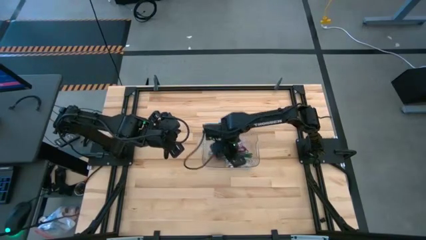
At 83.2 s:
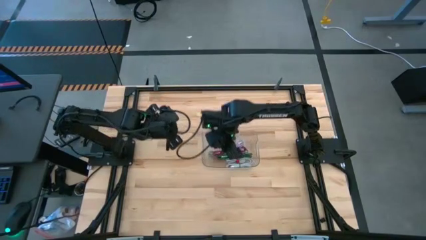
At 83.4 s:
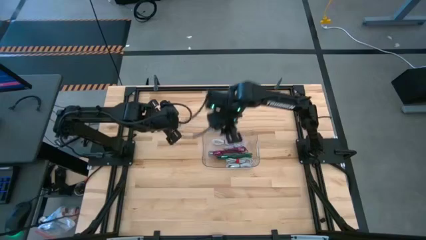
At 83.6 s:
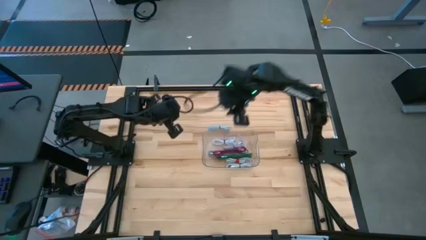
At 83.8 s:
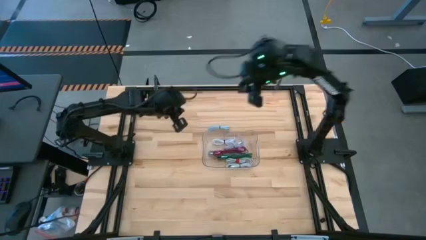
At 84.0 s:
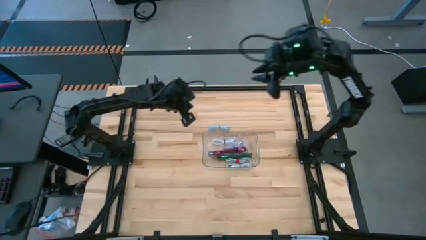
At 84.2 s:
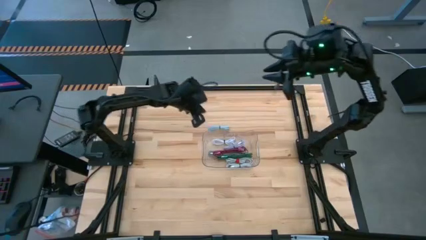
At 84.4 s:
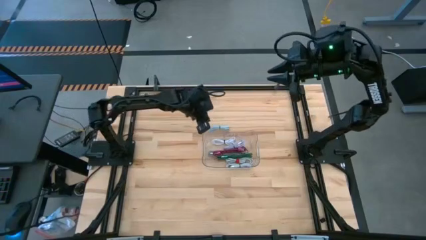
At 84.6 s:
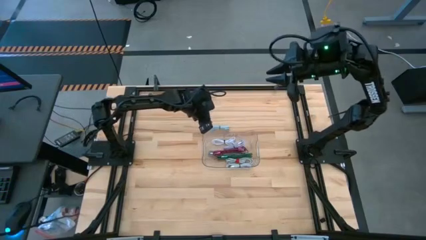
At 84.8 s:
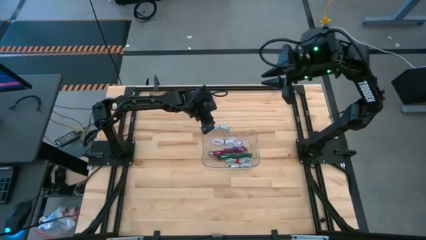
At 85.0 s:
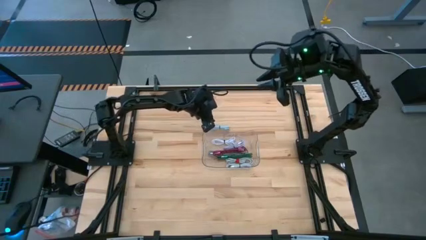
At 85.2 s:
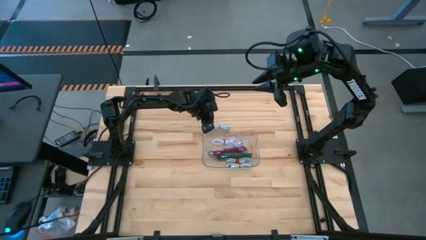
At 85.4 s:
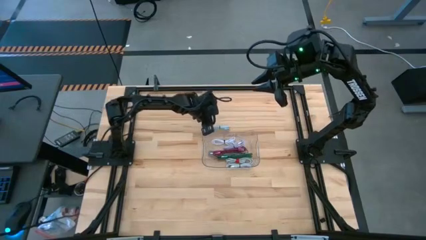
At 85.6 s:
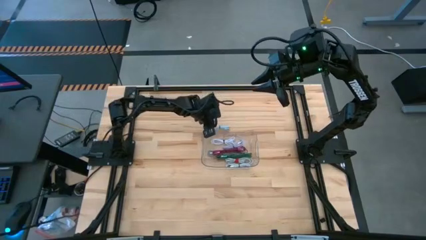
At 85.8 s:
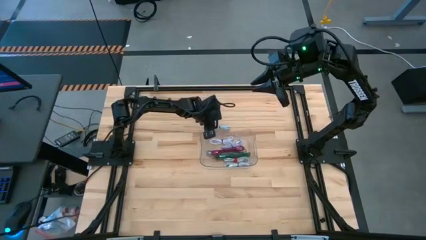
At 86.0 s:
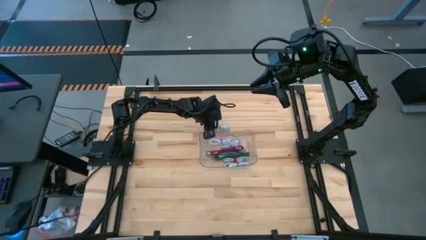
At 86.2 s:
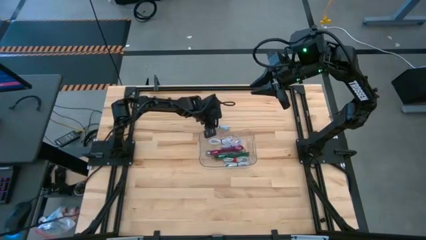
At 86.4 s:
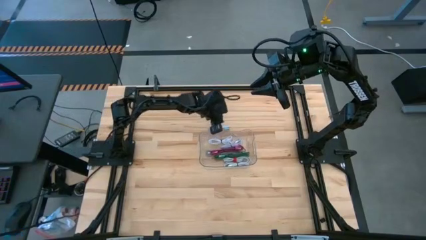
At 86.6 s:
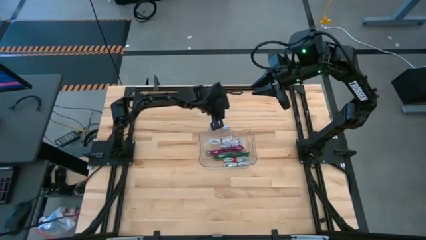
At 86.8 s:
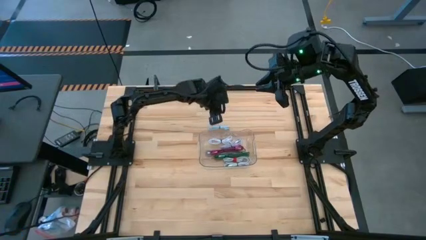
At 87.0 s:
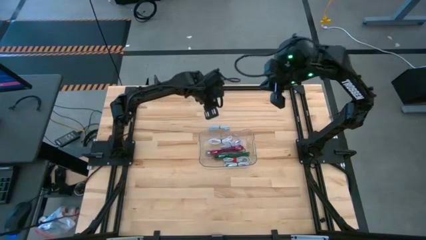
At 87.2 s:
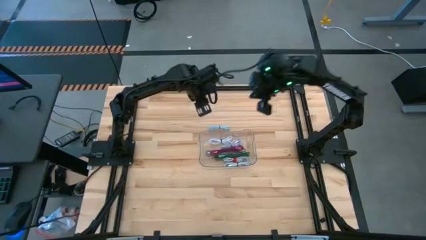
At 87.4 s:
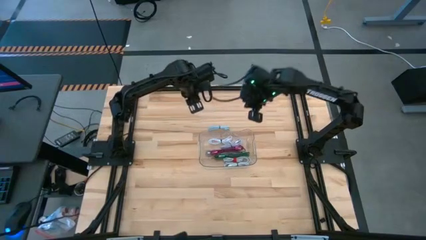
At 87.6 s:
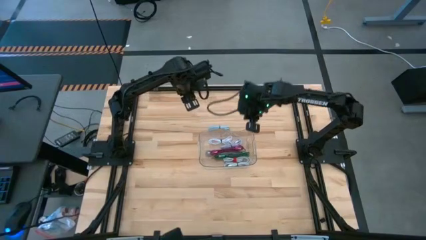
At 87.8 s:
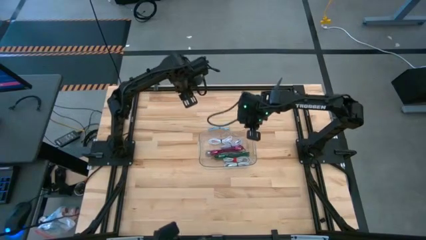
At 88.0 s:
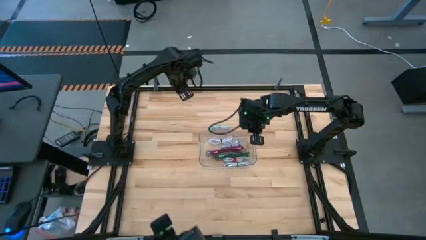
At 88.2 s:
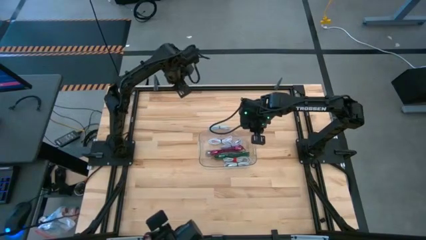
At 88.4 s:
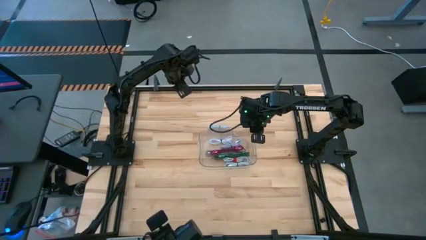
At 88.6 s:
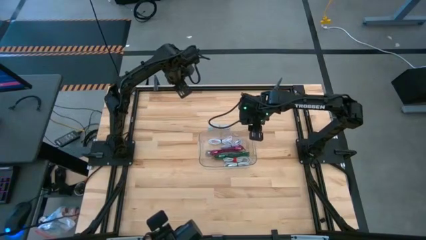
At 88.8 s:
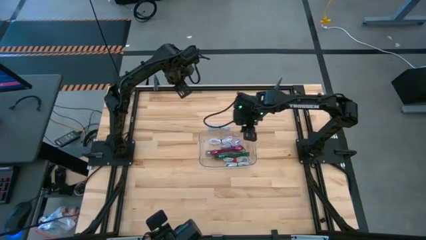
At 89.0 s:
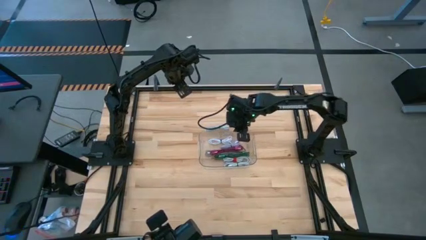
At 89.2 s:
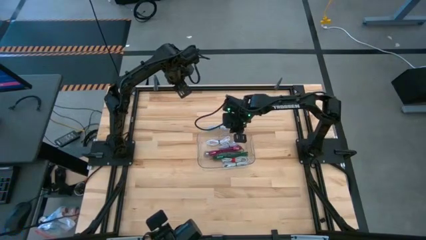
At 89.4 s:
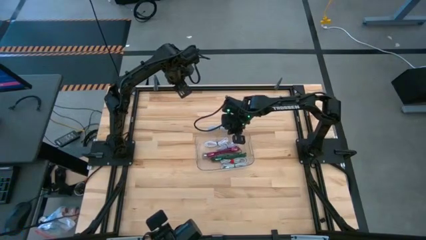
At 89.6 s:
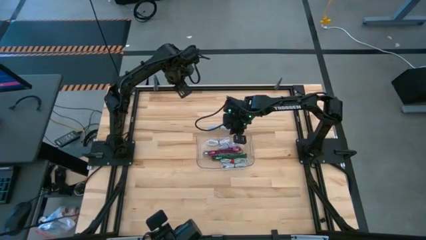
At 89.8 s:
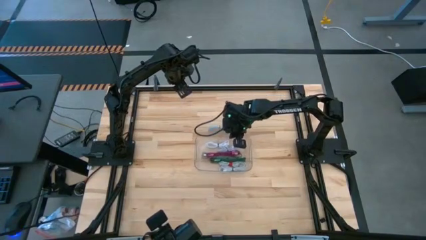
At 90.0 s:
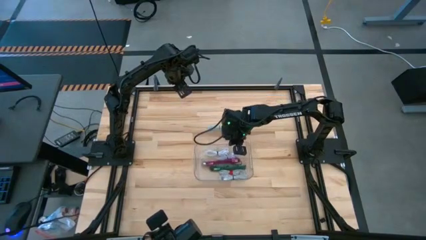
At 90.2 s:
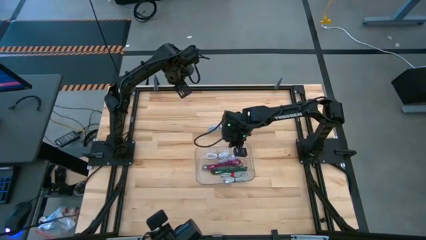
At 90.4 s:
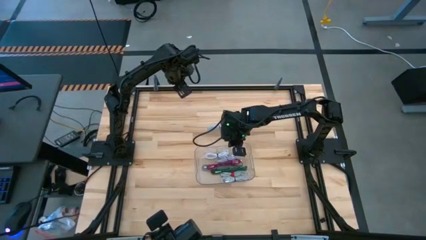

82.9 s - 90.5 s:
Task: Pick and place USB-C Cables
Adjust the transparent bin

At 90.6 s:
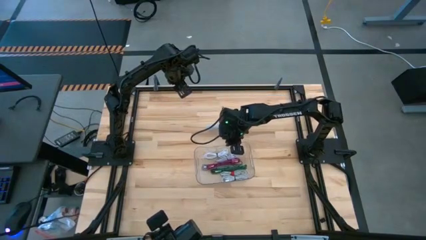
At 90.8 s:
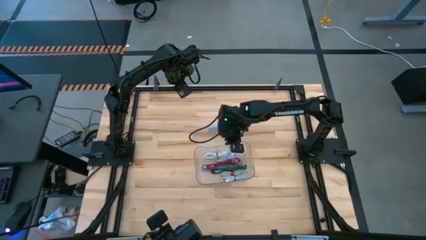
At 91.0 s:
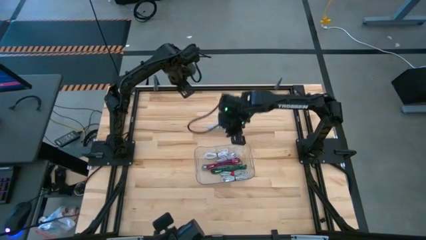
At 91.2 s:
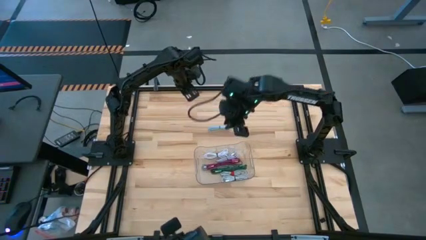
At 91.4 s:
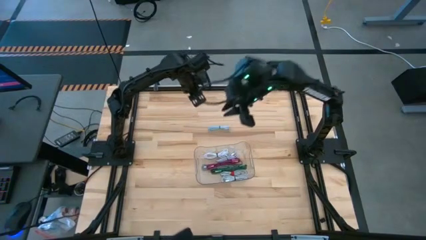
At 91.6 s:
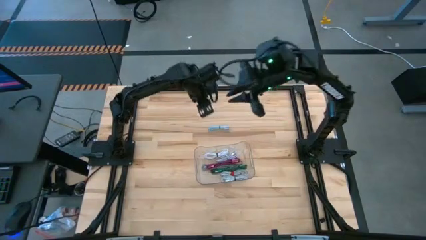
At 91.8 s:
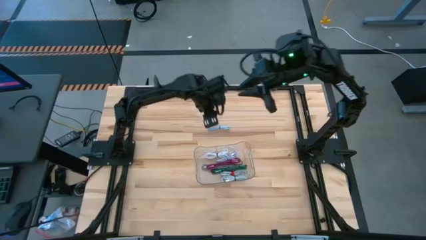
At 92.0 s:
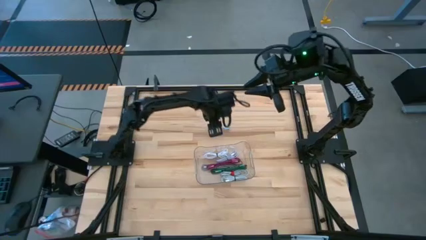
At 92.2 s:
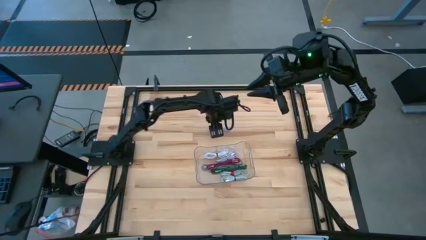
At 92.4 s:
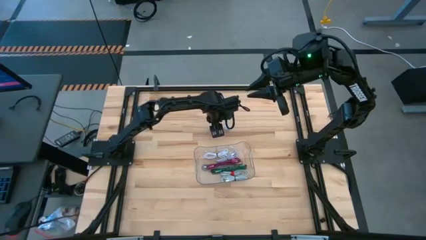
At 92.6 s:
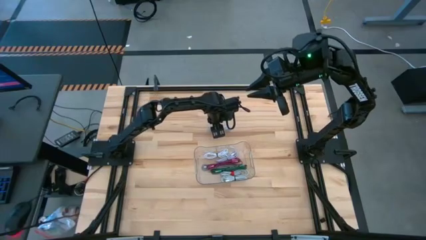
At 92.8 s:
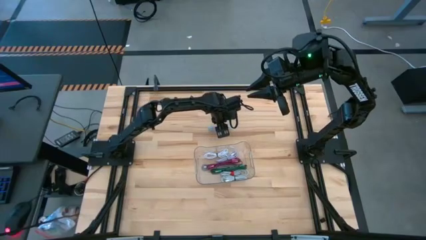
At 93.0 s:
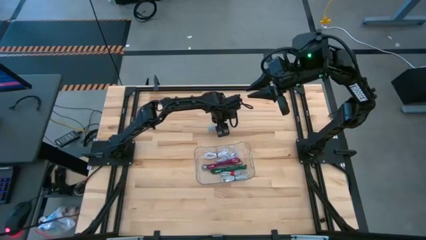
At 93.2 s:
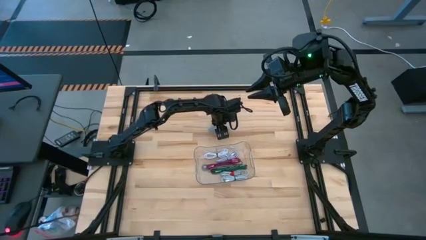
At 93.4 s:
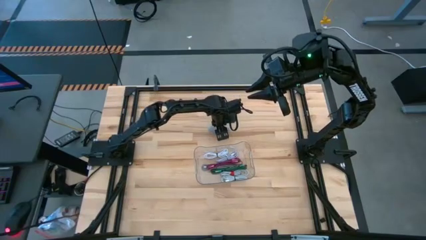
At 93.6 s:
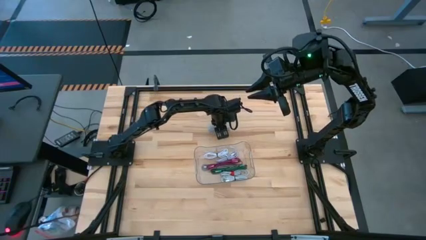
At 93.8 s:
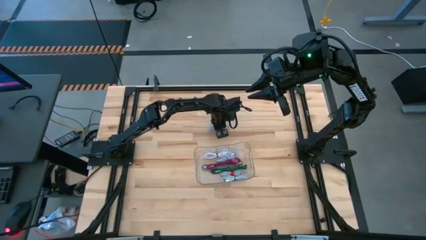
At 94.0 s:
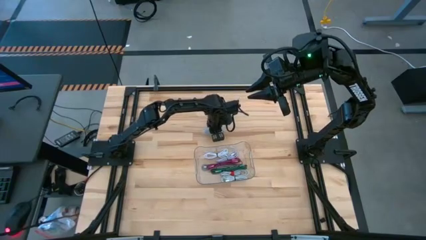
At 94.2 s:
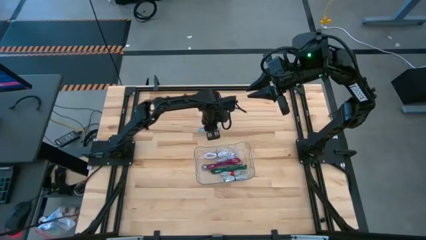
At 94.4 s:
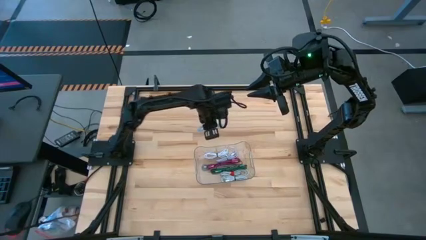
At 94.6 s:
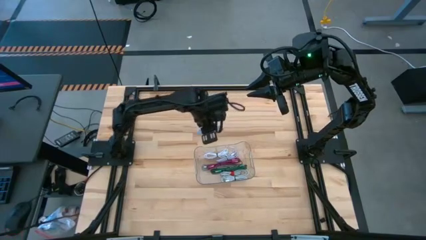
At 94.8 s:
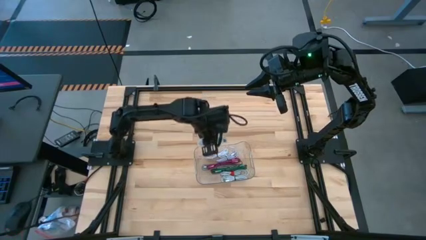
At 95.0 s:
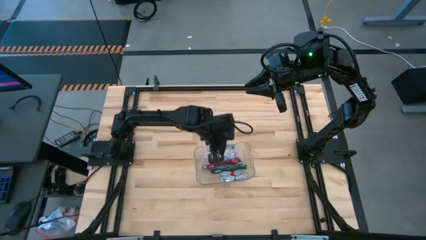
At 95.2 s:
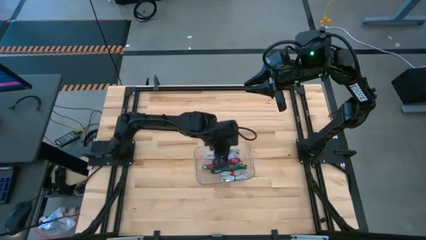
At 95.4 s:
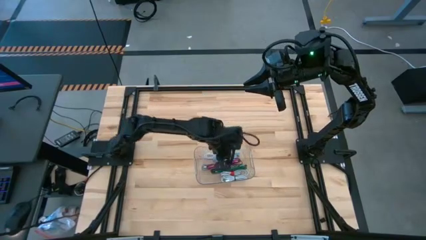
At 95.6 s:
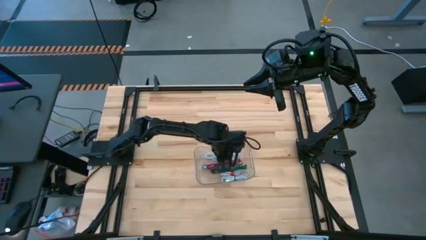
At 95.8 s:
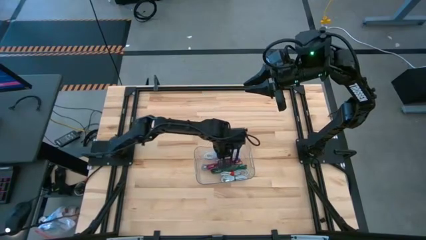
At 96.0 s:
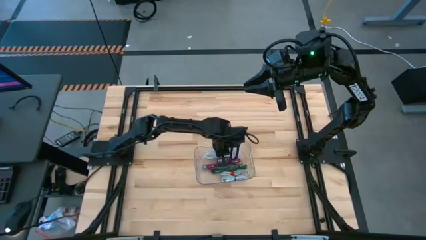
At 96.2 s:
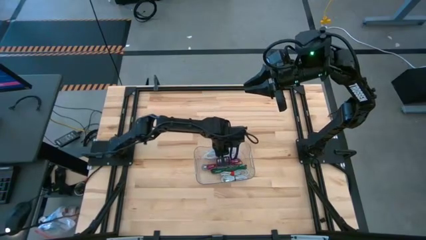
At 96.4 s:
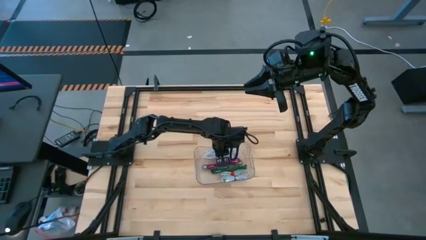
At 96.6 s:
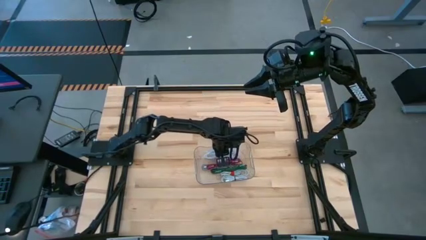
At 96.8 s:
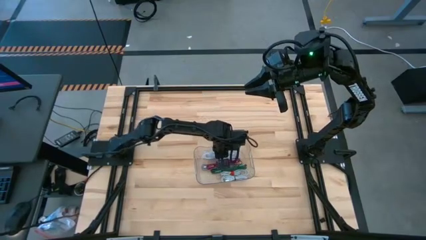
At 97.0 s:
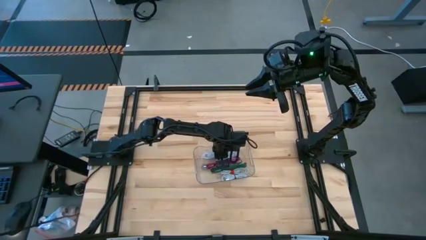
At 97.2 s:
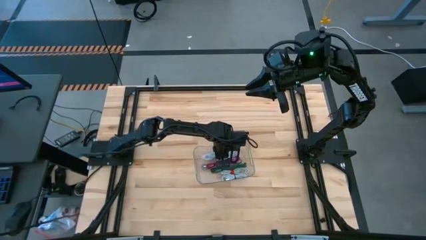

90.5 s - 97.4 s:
Put the light blue charger cable into the transparent bin
